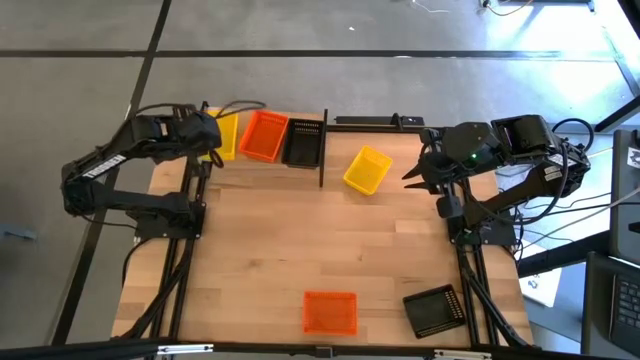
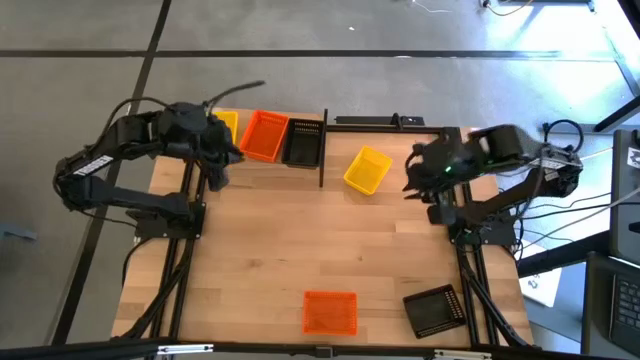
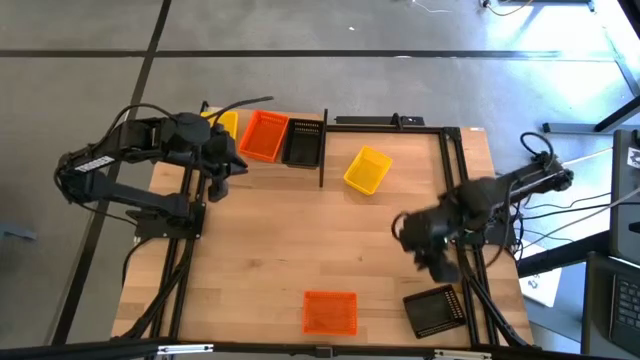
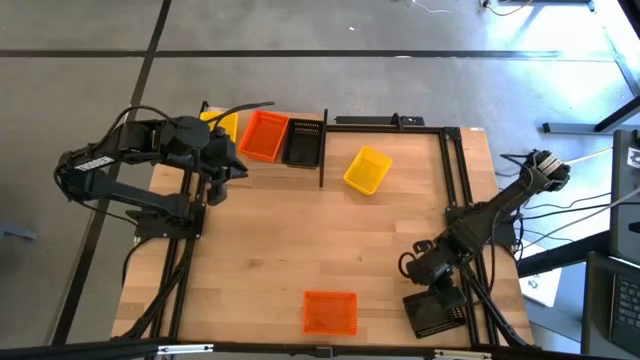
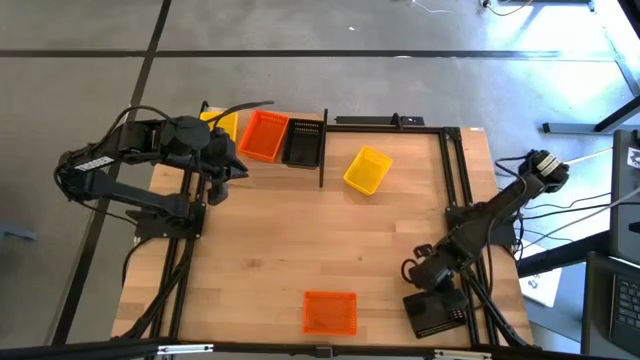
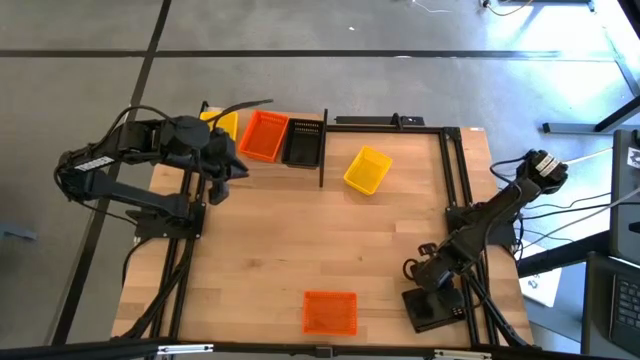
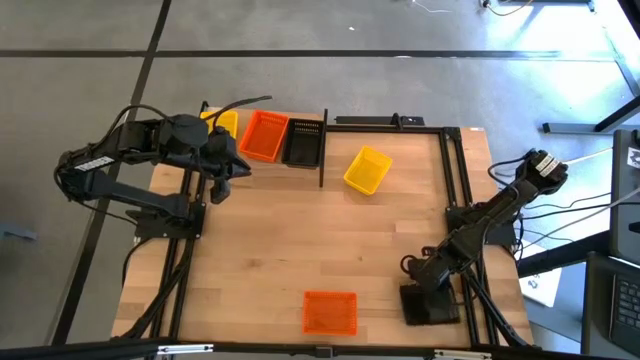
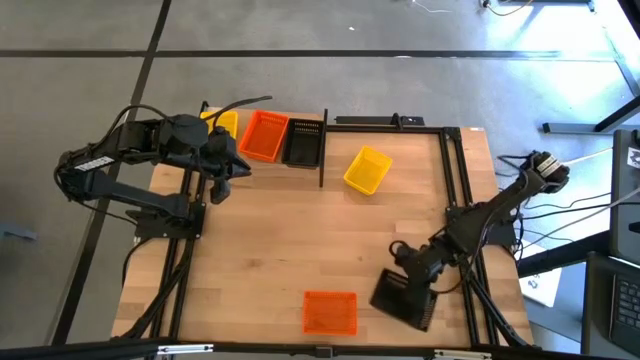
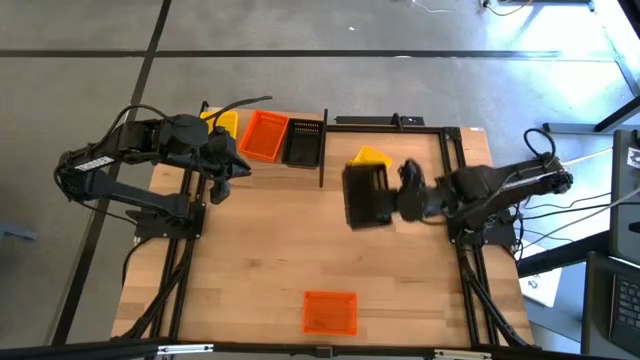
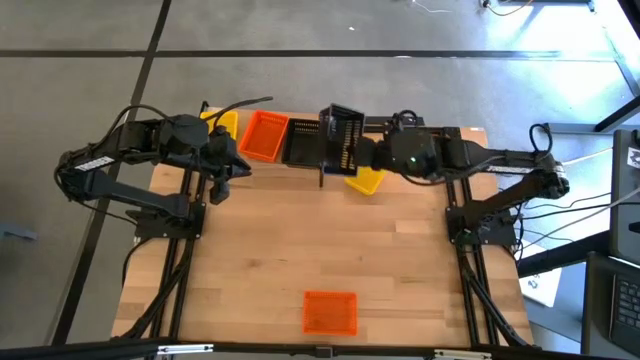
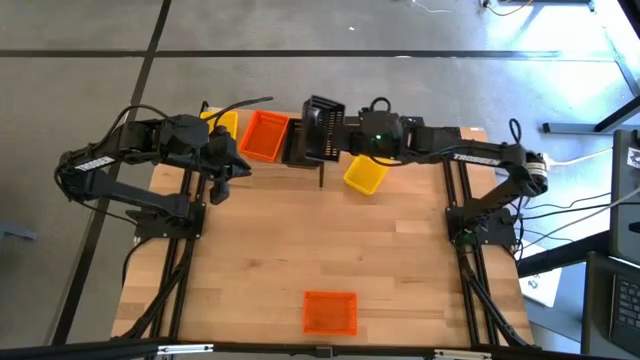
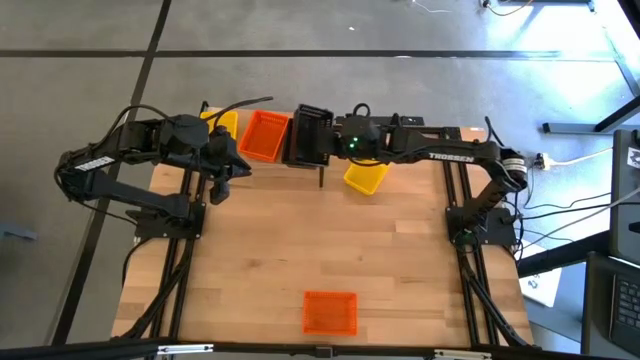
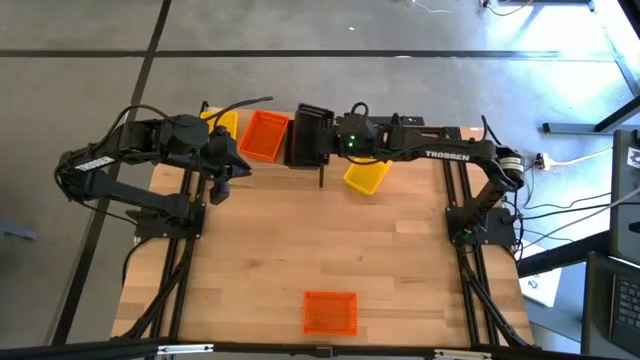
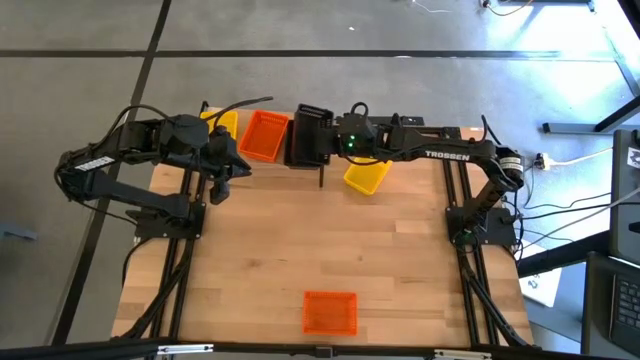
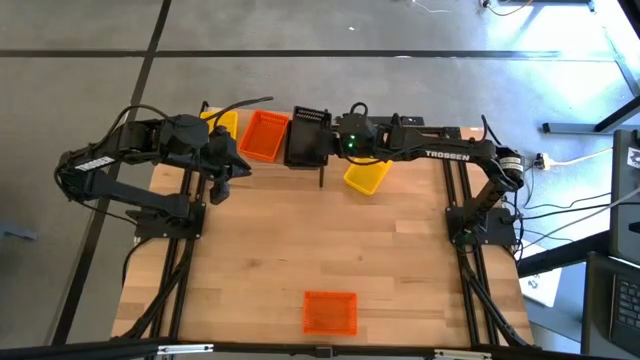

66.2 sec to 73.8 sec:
Task: Stack baskets on shelf by color
Stack the black basket on top of the black basket on the shelf

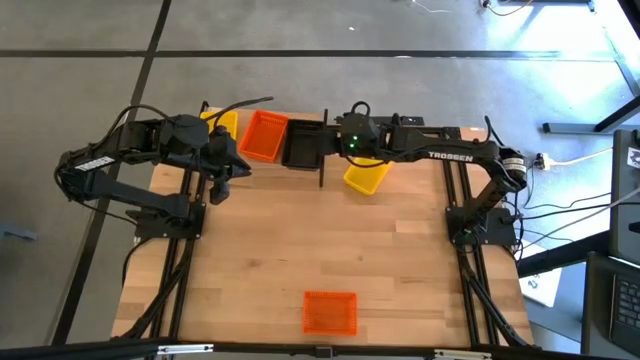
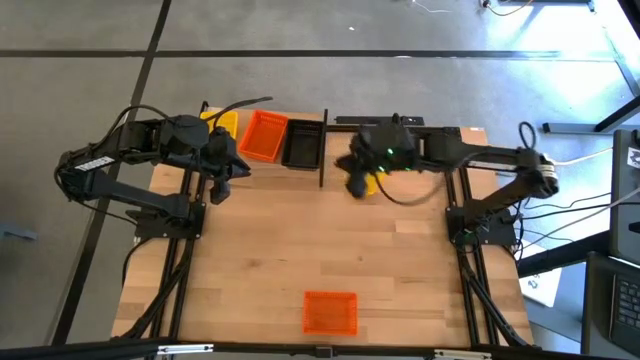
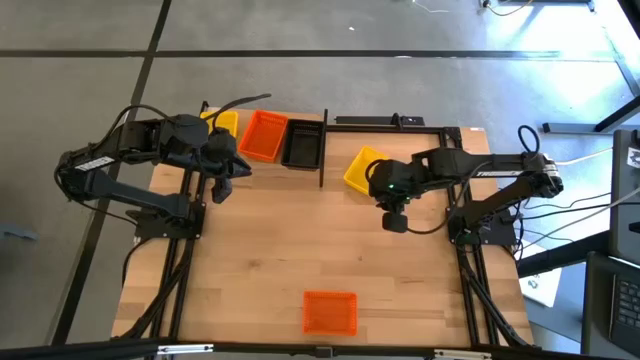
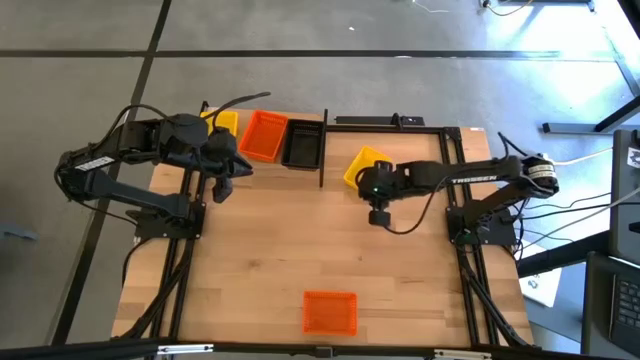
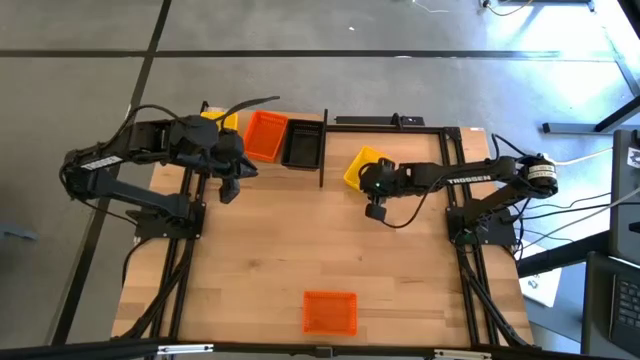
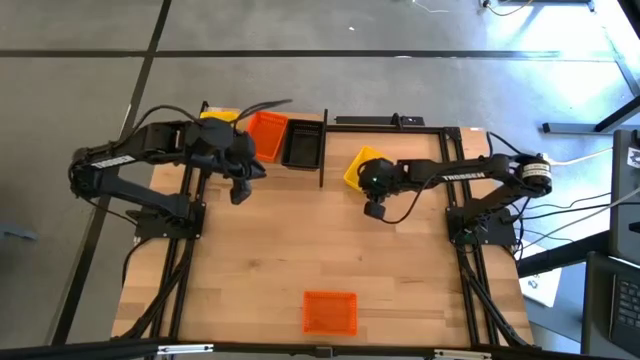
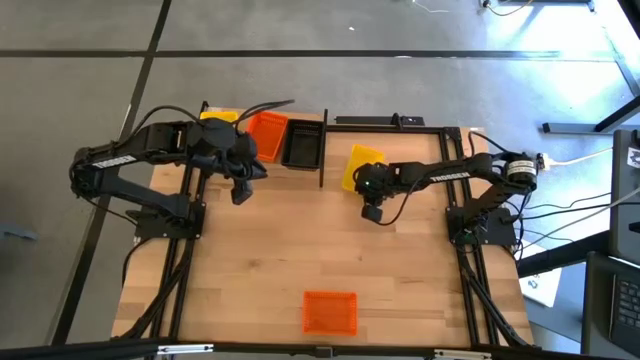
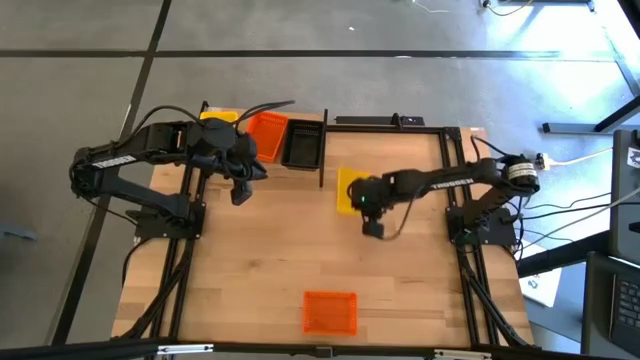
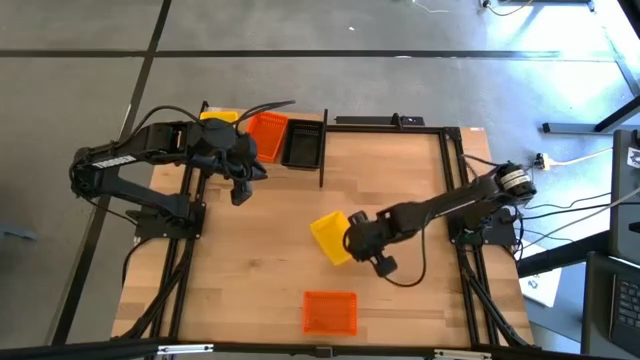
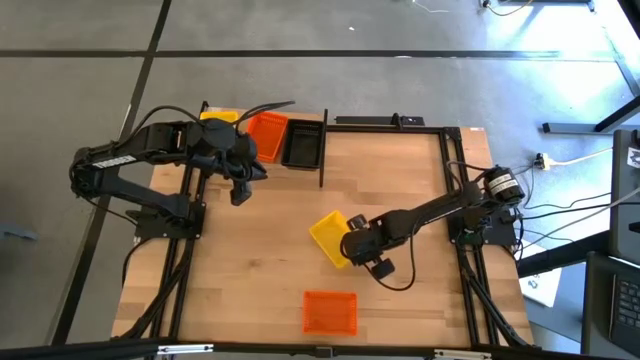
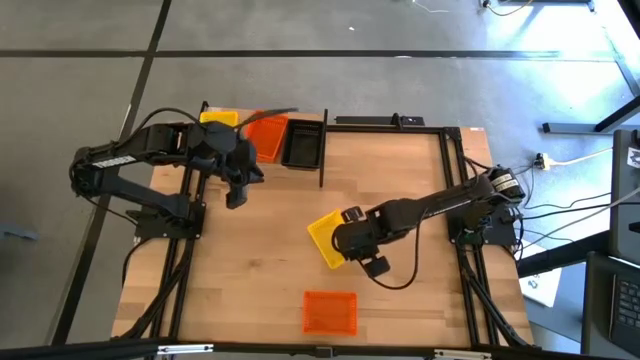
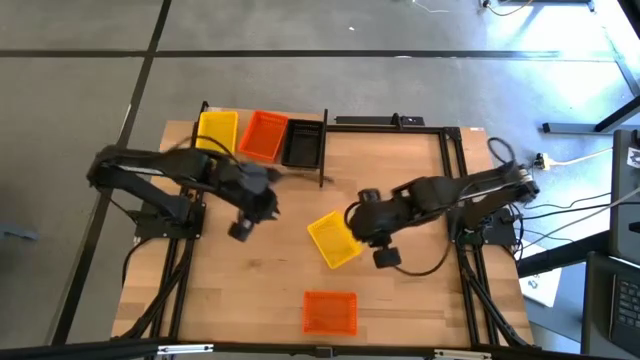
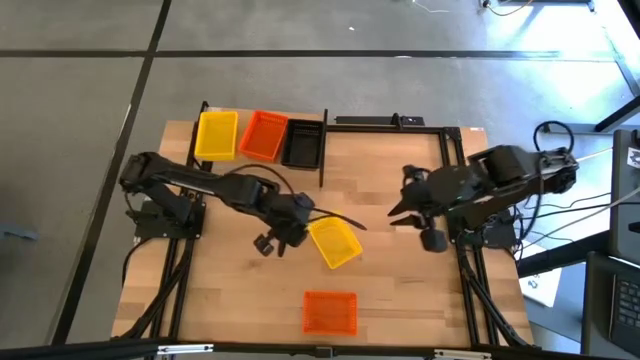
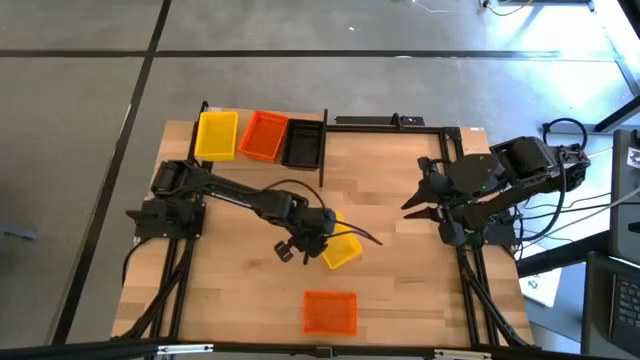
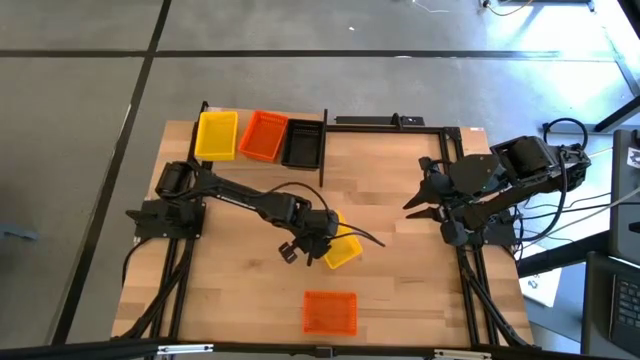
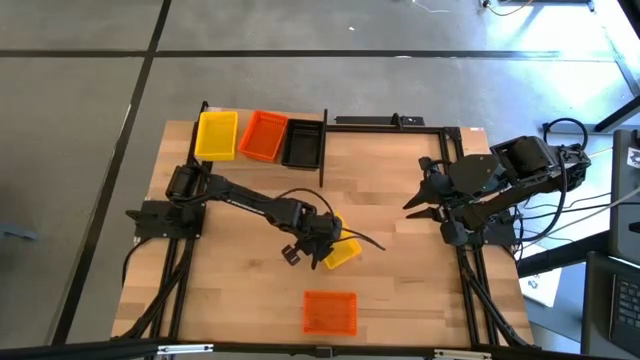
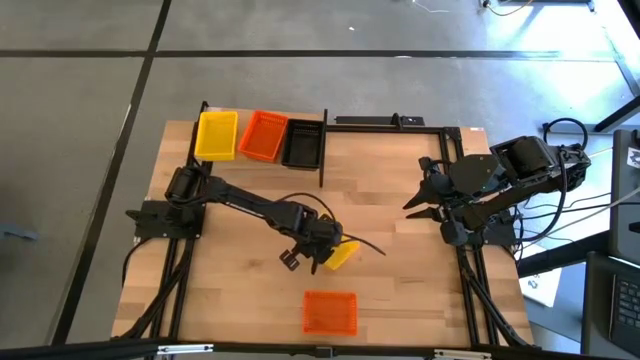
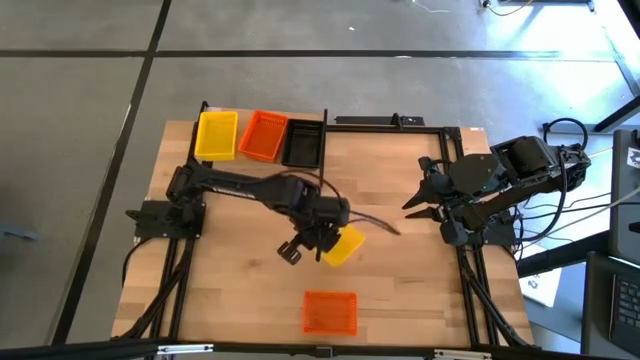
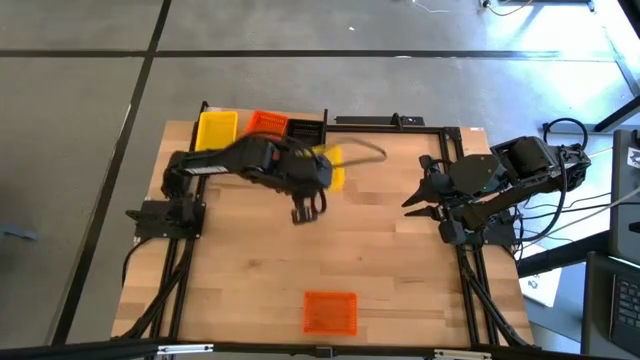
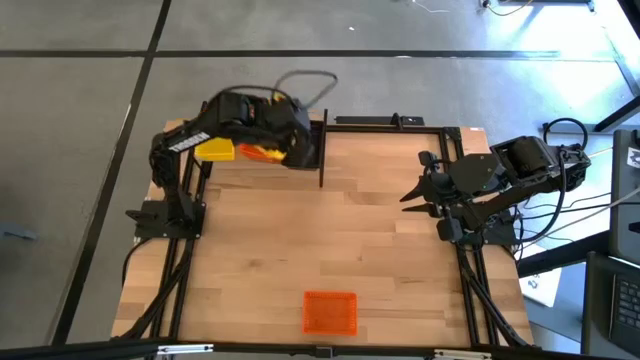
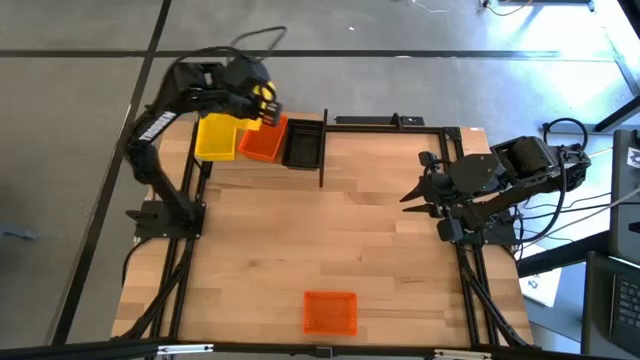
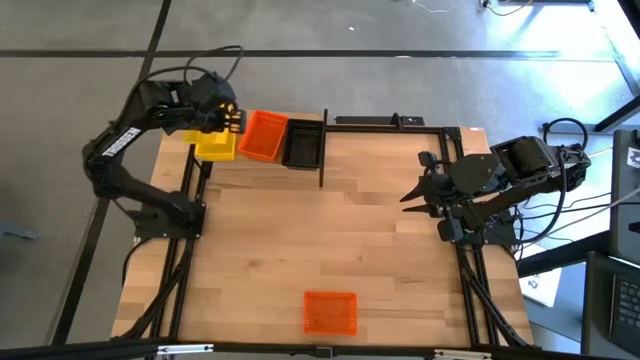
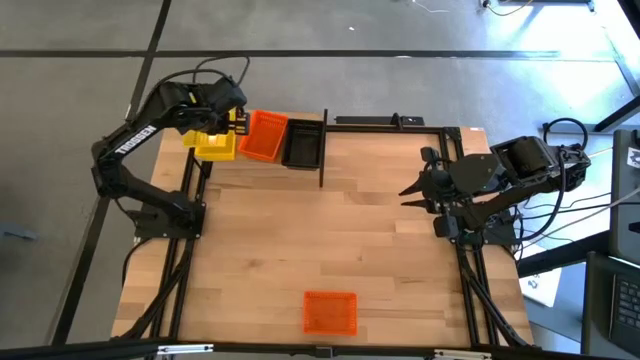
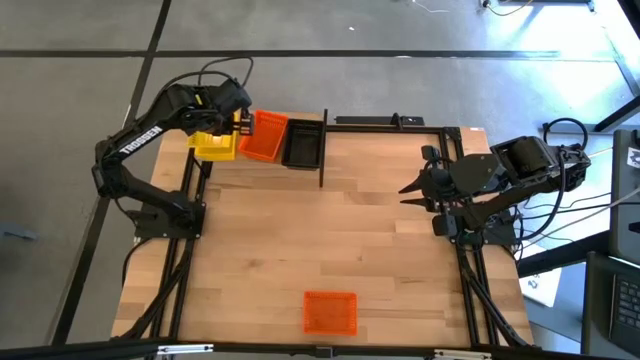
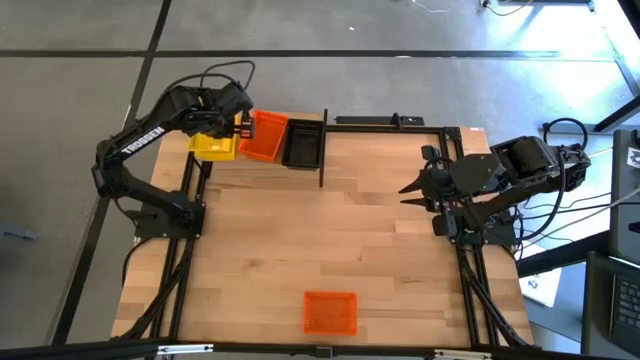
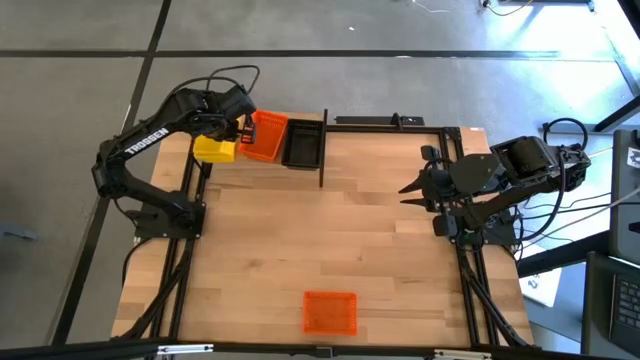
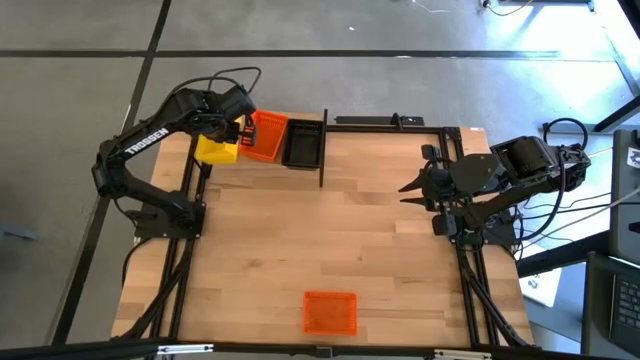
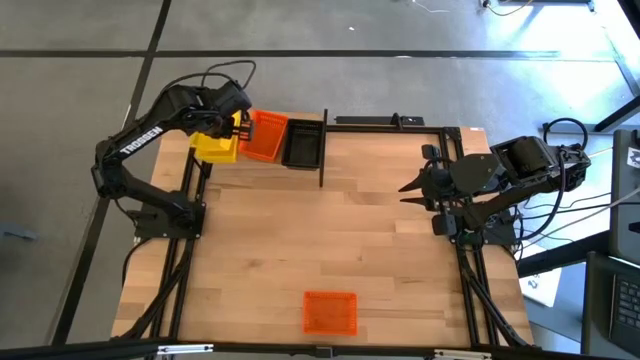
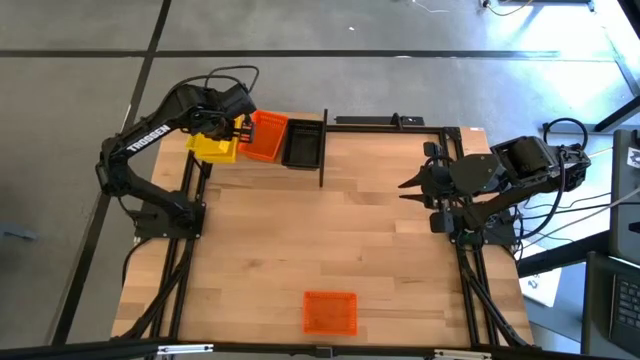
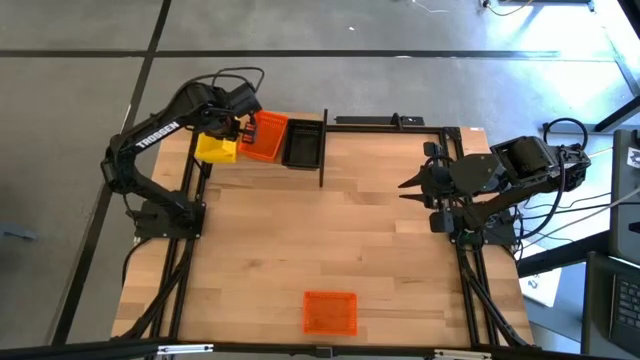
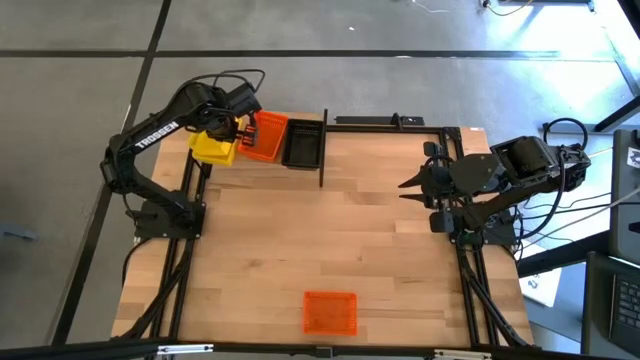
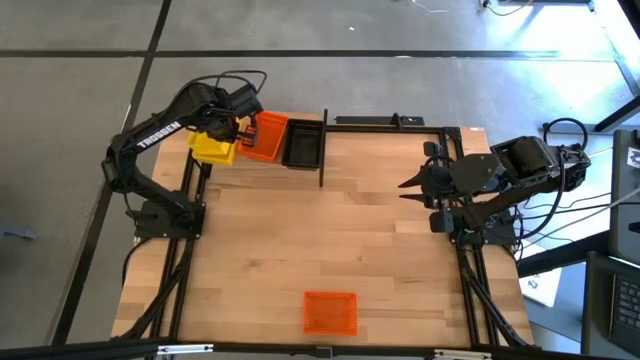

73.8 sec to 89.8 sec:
Stack the yellow basket on top of the yellow basket on the shelf
